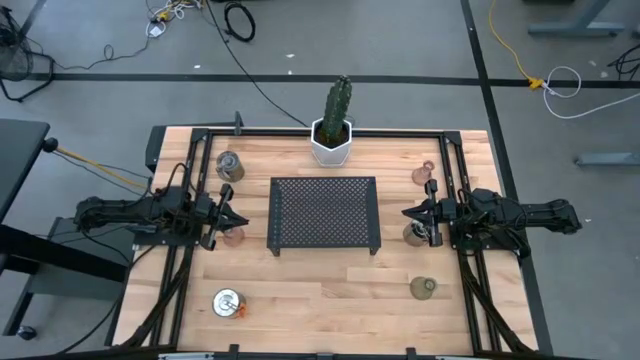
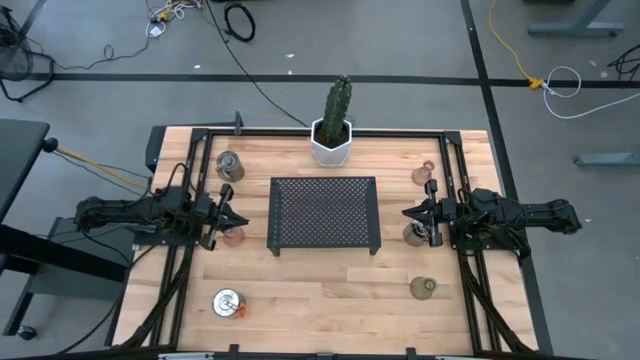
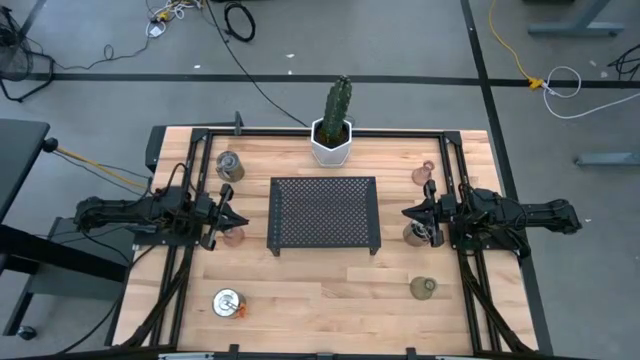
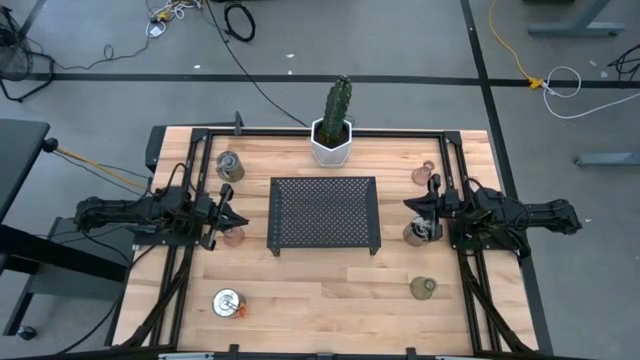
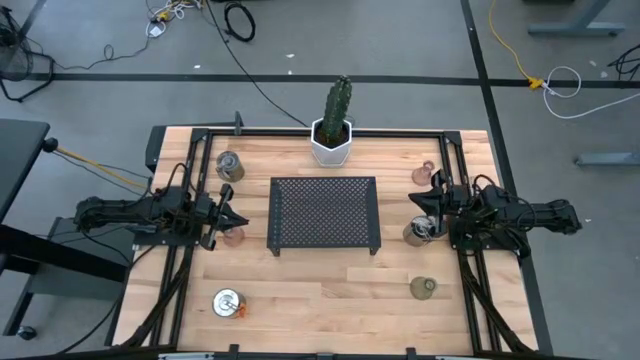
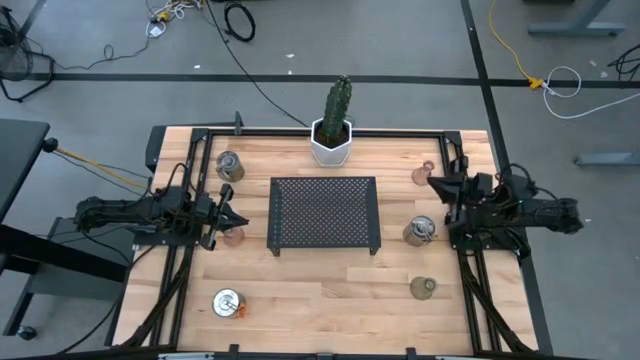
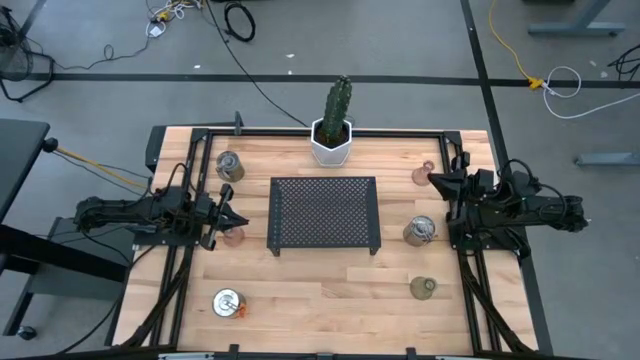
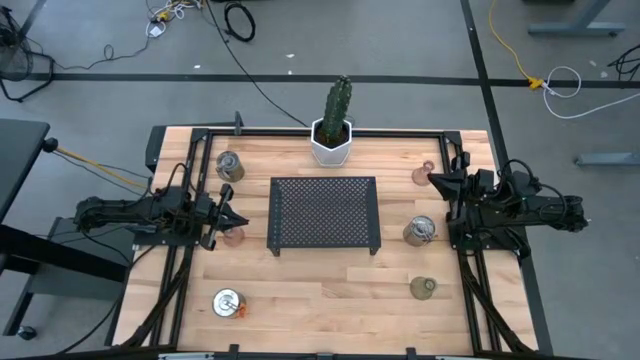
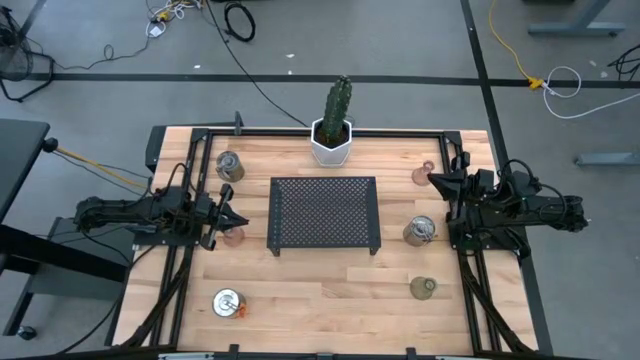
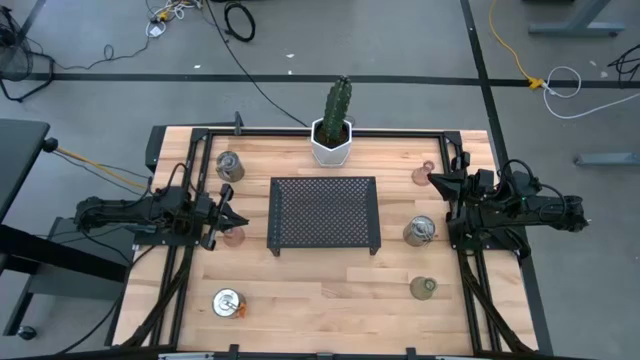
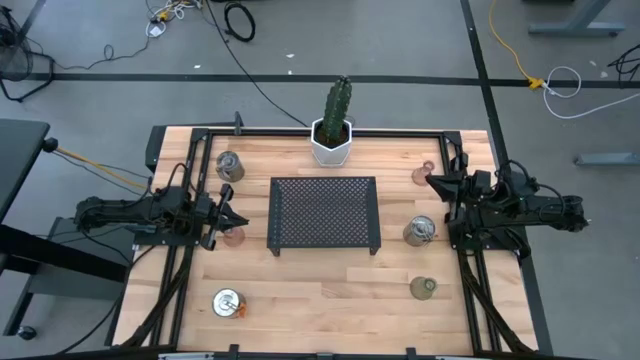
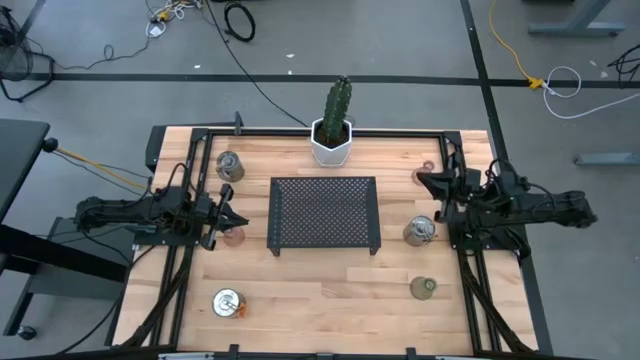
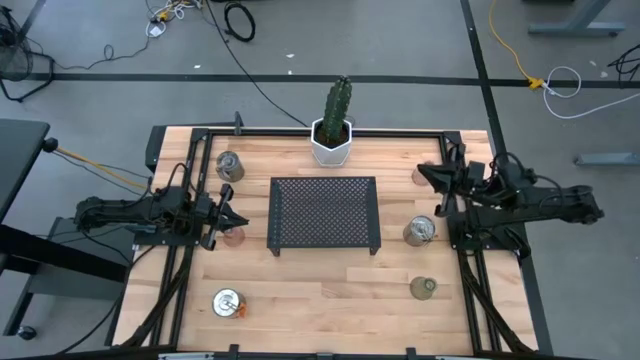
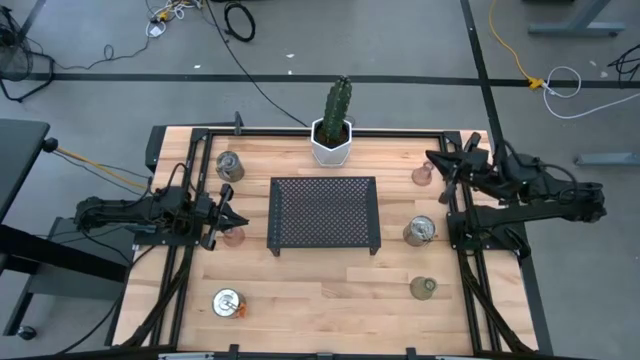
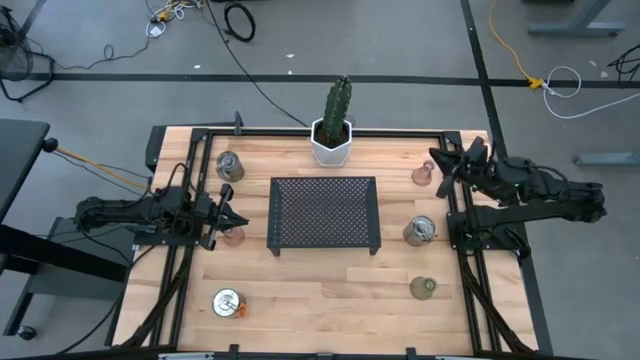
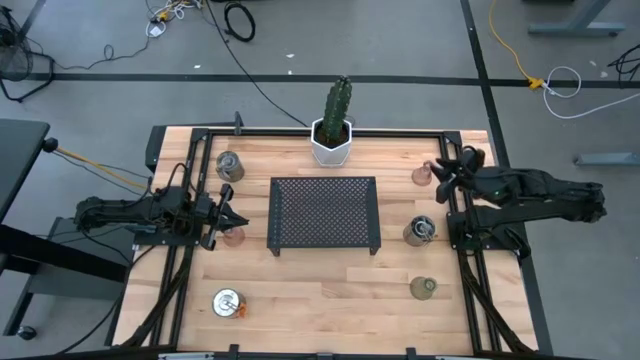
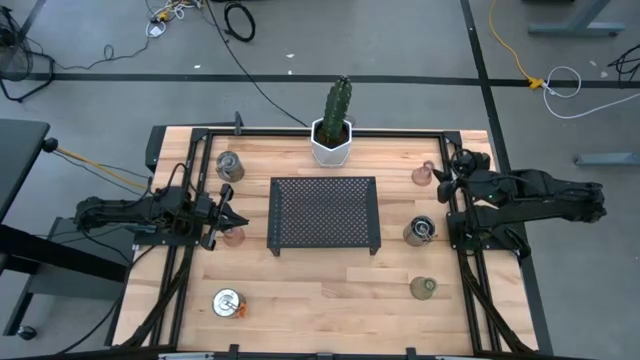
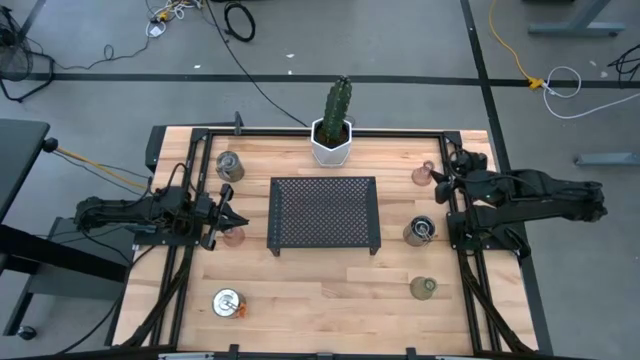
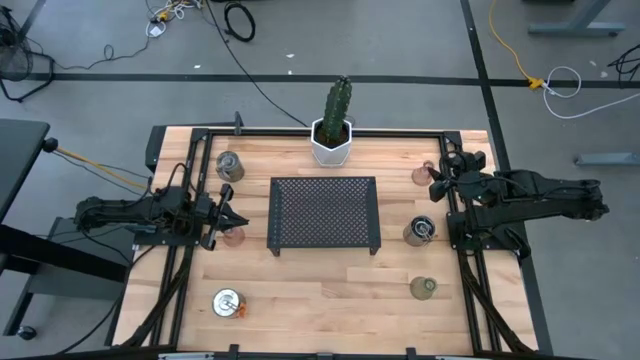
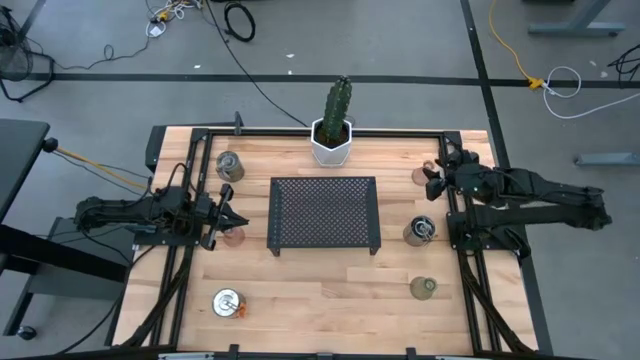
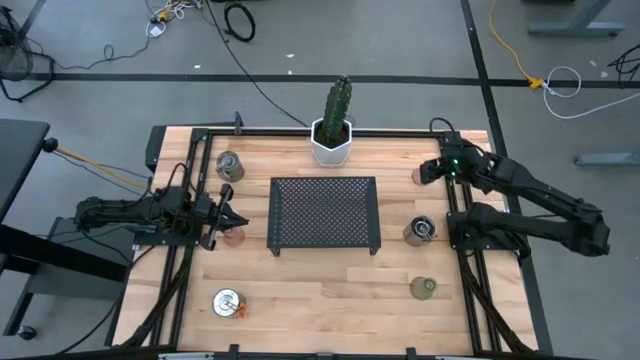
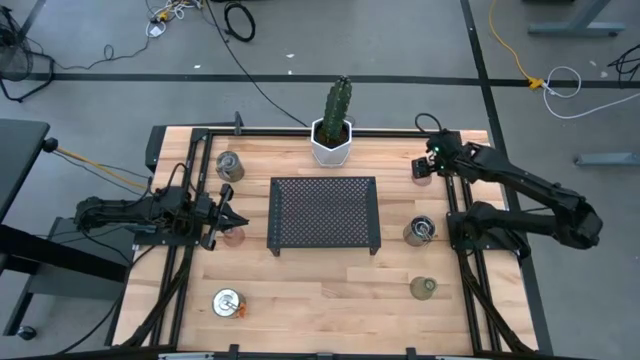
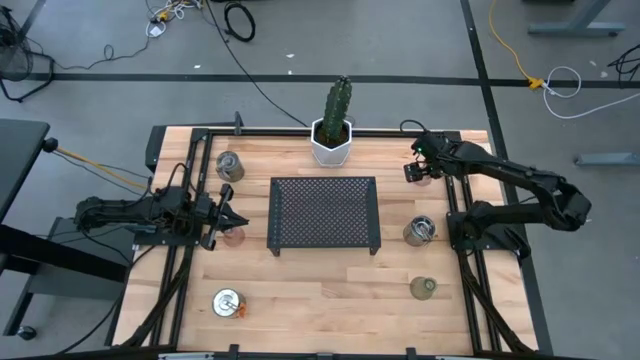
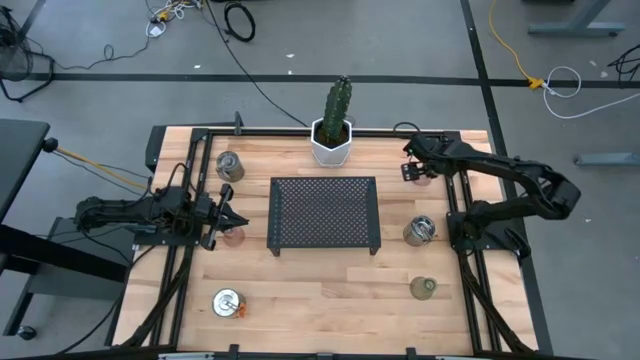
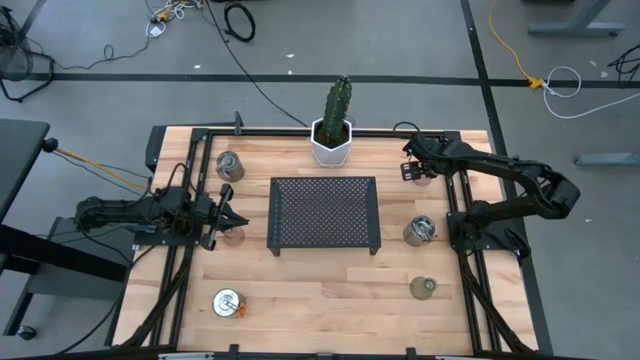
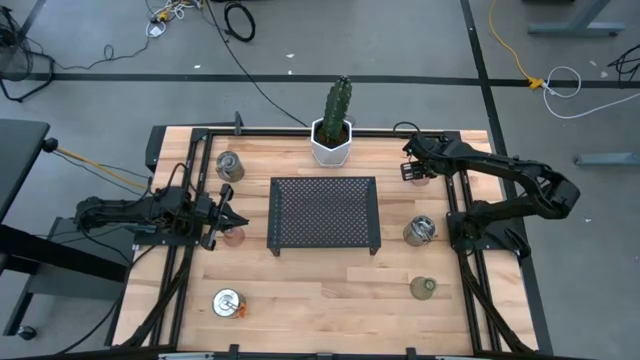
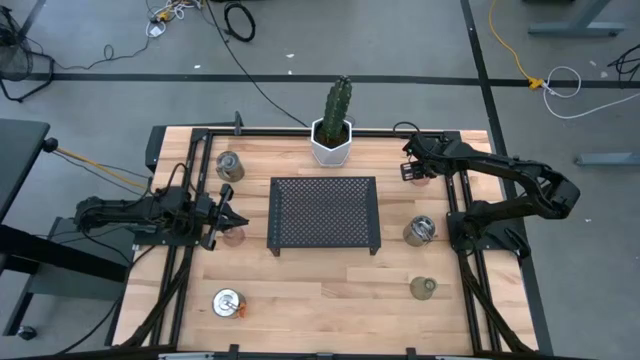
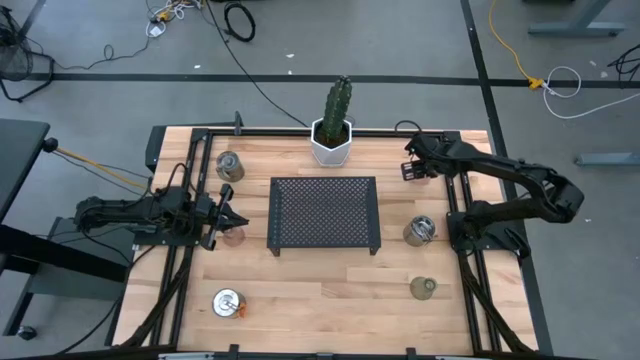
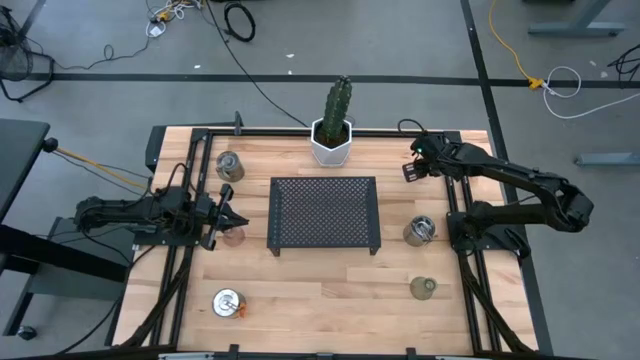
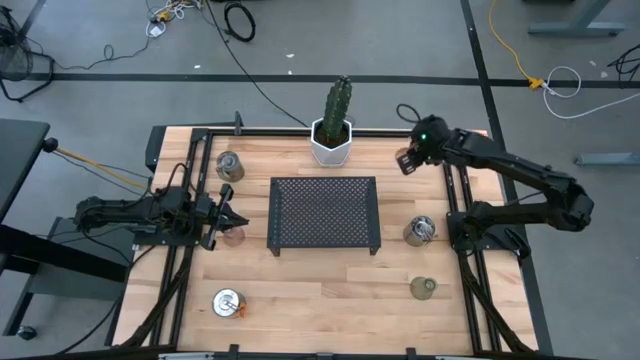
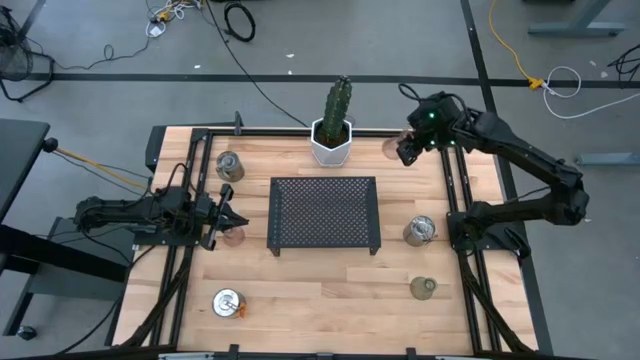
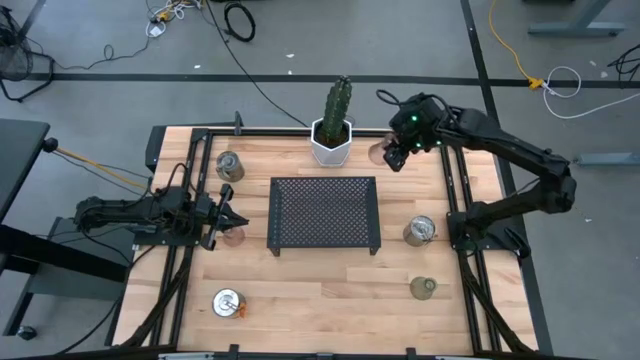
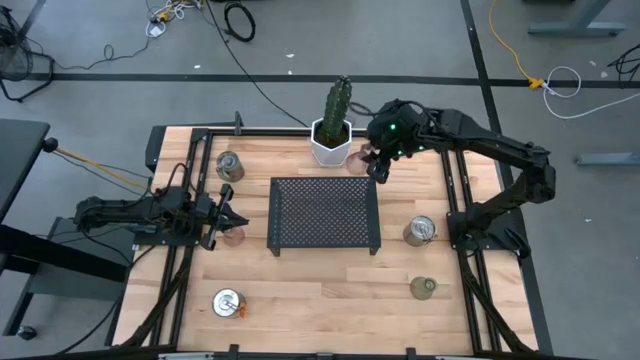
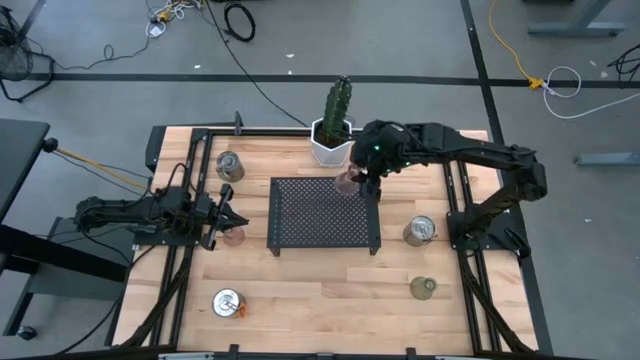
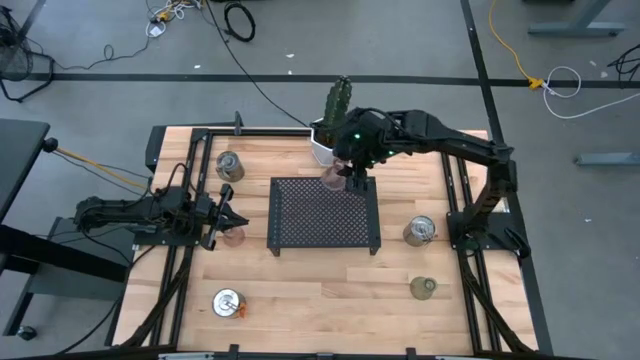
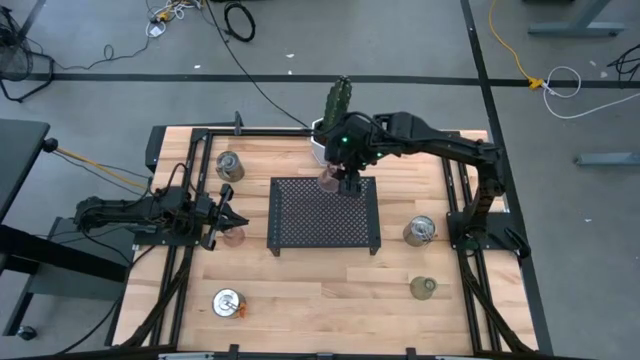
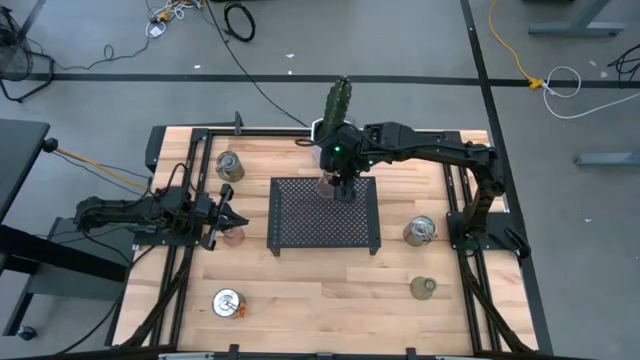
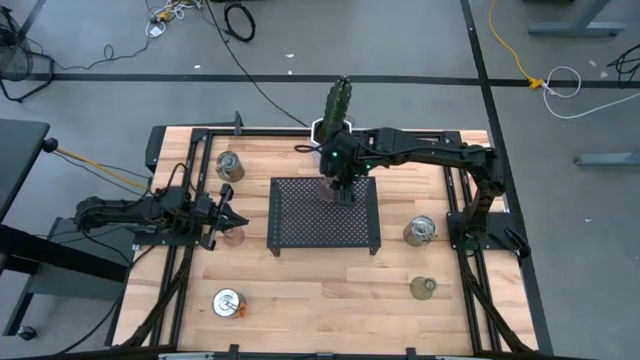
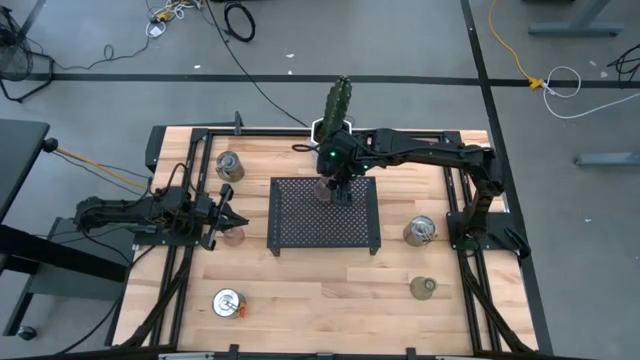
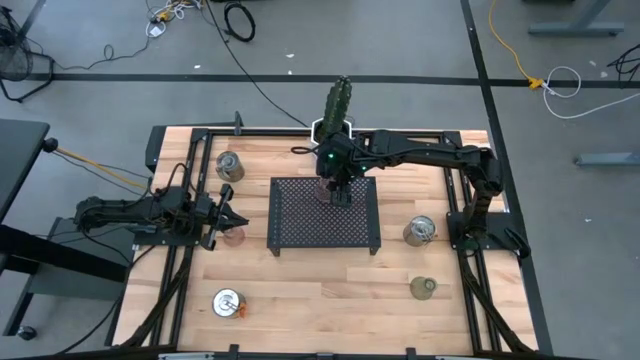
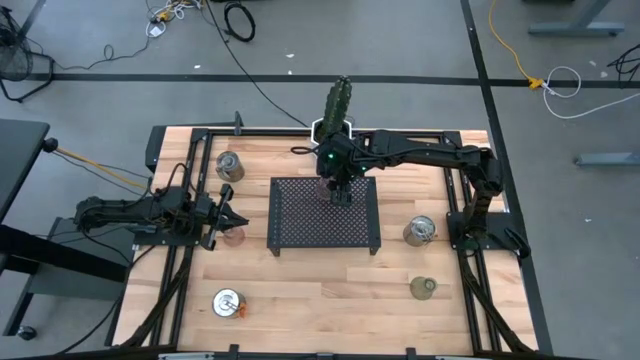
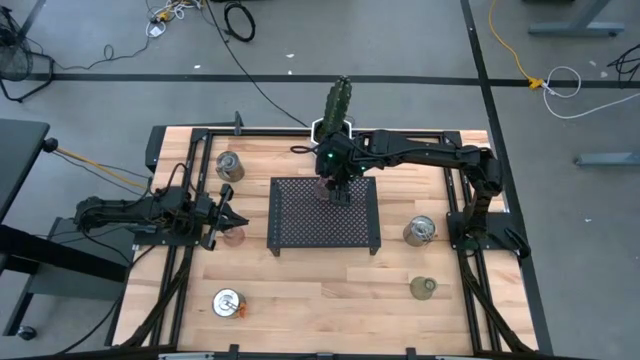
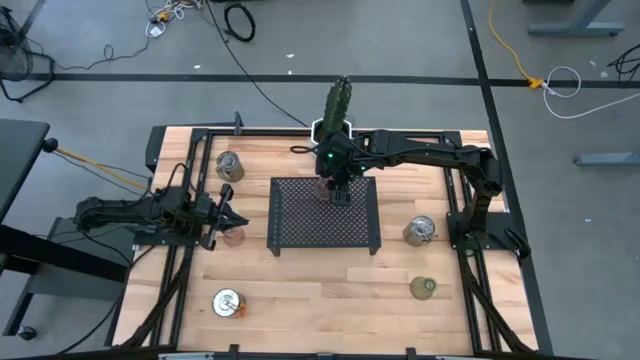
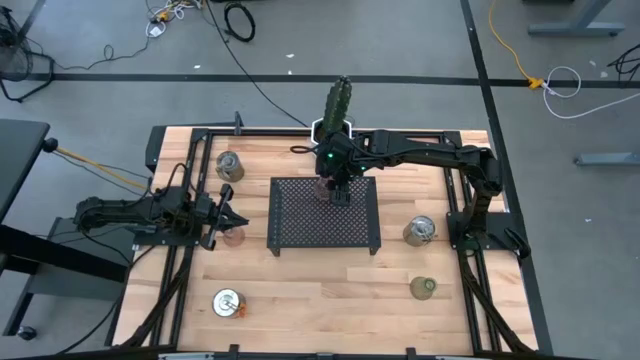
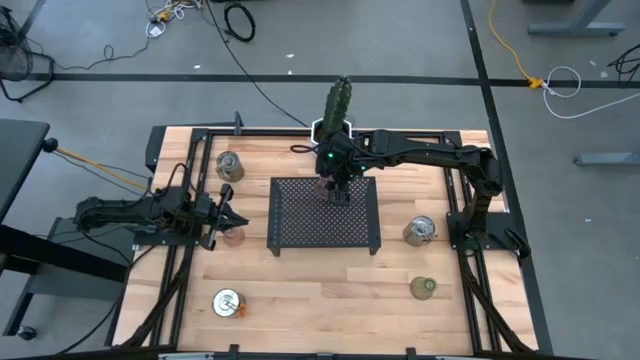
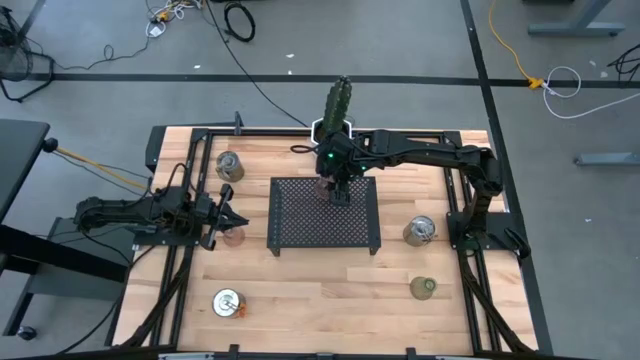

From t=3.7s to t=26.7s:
Task: Pick & Place candle stick holders
Put the right purple glass candle holder on the shelf
